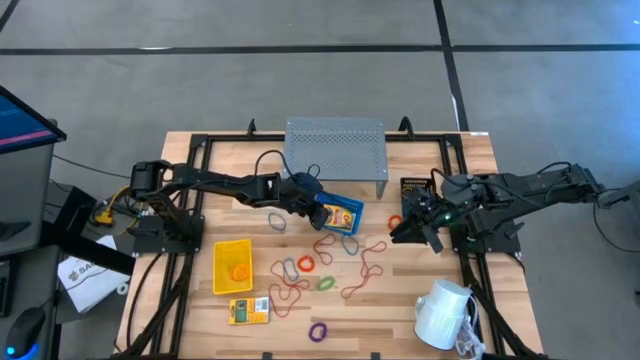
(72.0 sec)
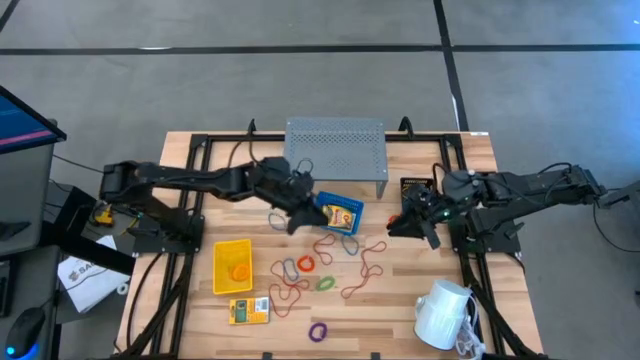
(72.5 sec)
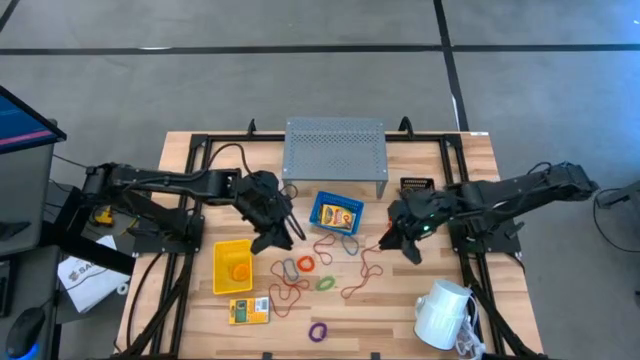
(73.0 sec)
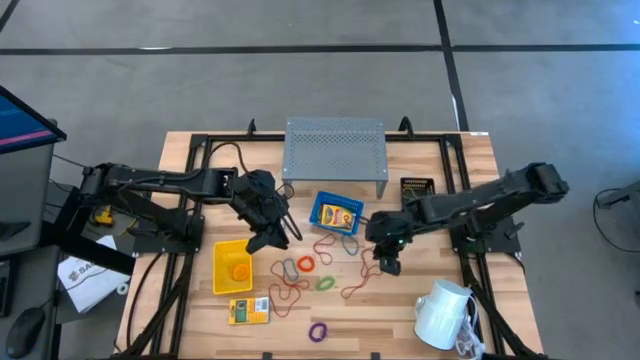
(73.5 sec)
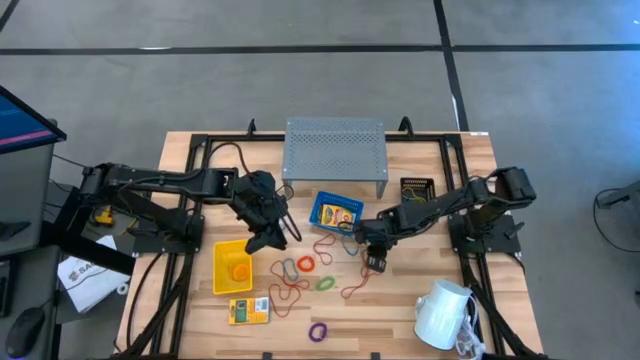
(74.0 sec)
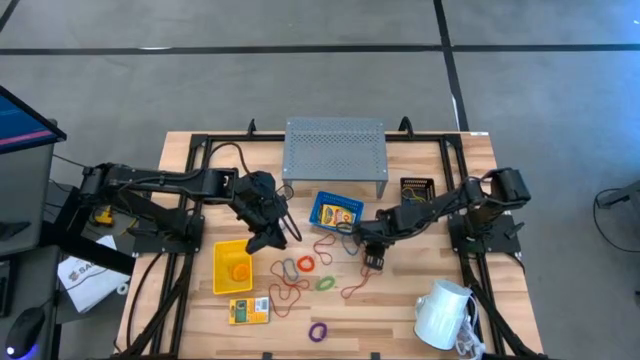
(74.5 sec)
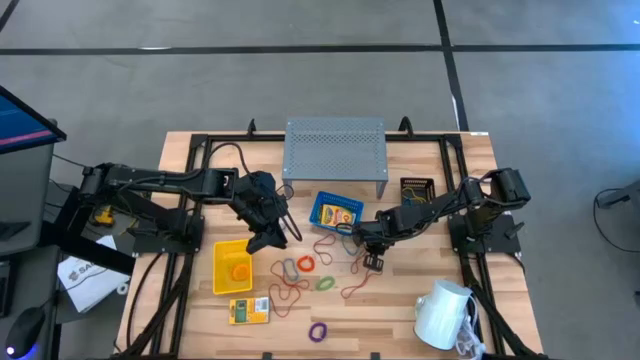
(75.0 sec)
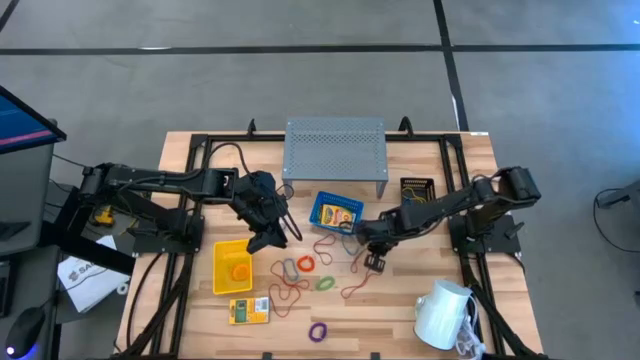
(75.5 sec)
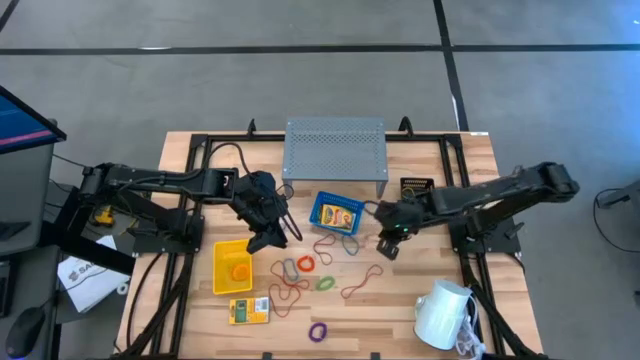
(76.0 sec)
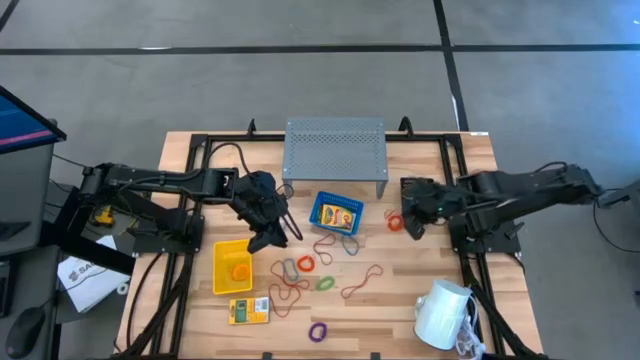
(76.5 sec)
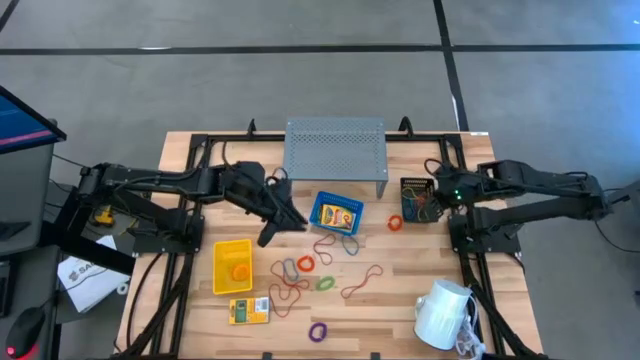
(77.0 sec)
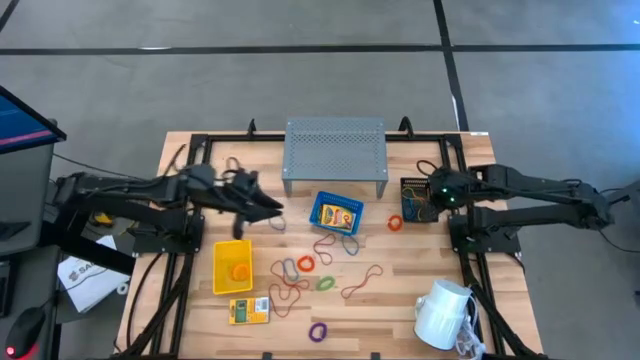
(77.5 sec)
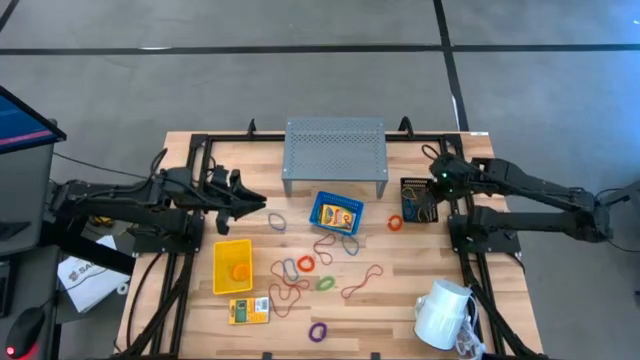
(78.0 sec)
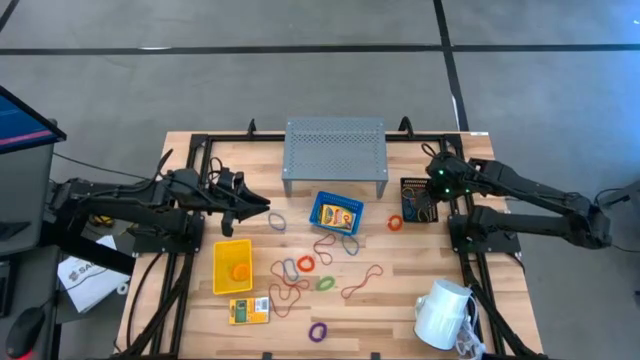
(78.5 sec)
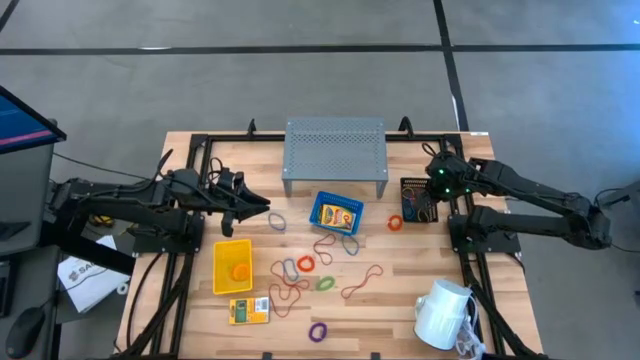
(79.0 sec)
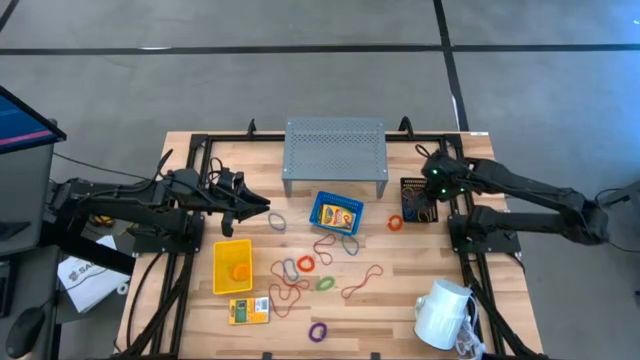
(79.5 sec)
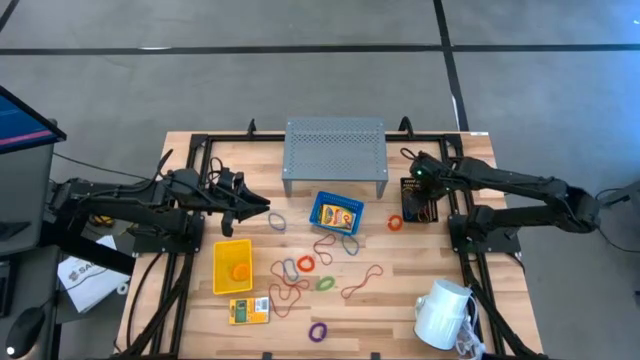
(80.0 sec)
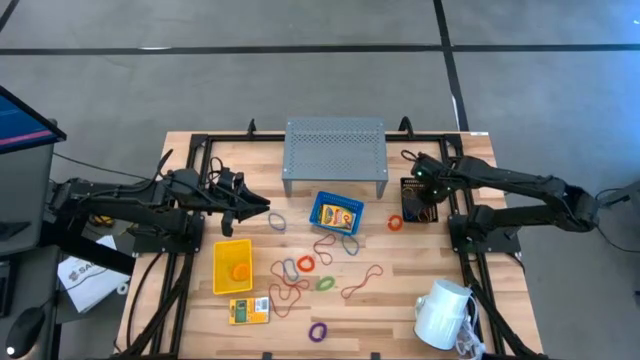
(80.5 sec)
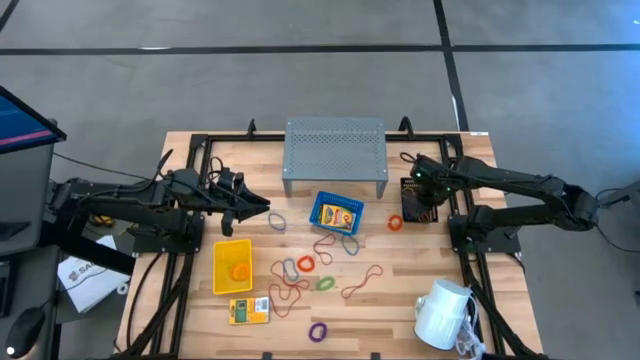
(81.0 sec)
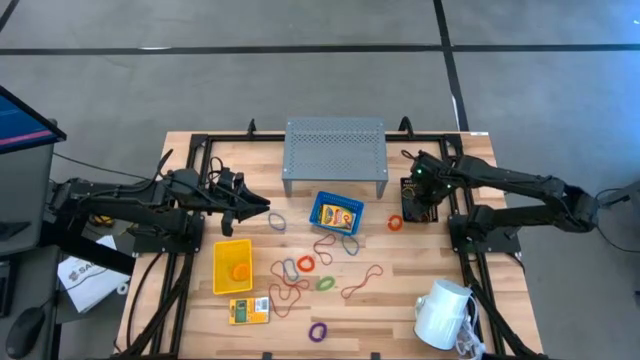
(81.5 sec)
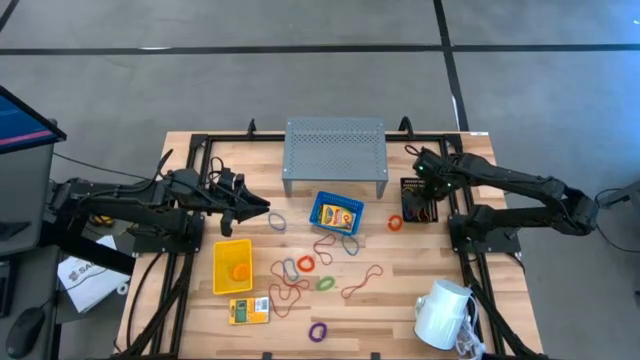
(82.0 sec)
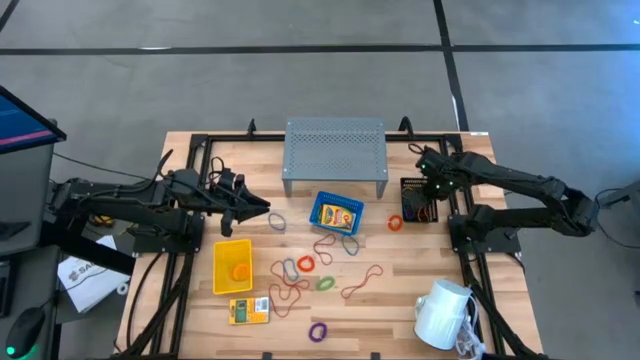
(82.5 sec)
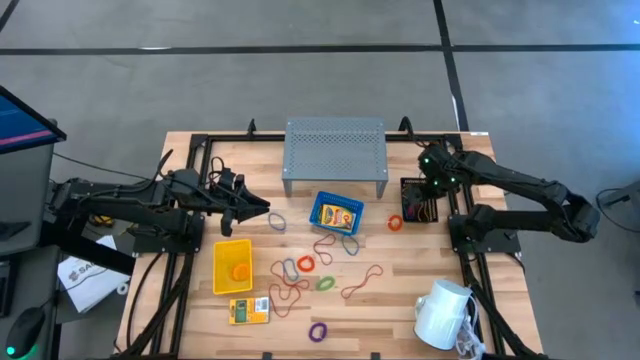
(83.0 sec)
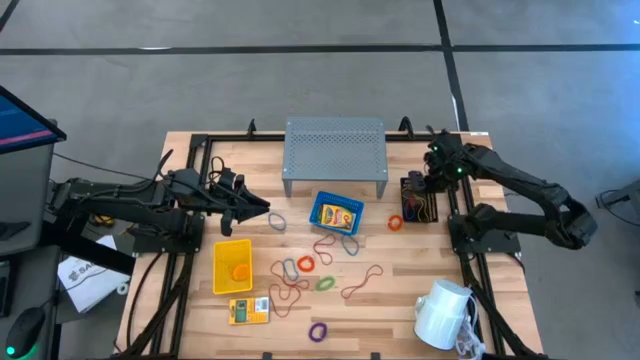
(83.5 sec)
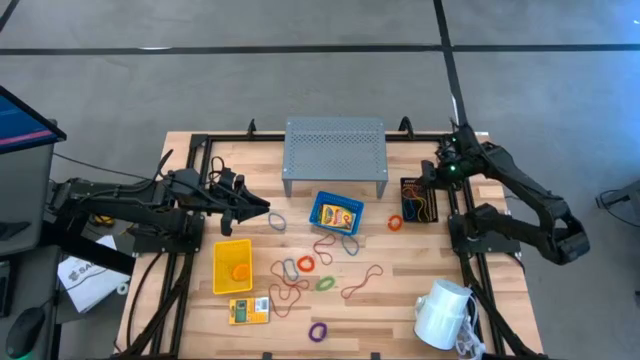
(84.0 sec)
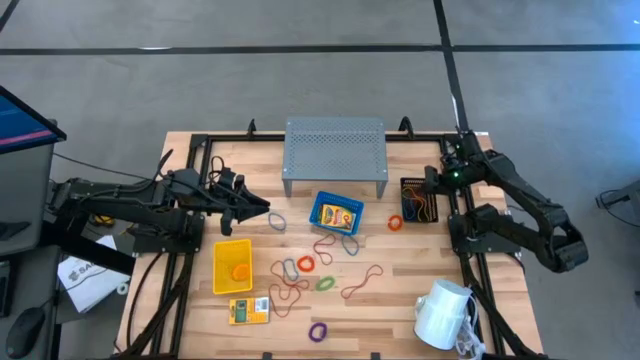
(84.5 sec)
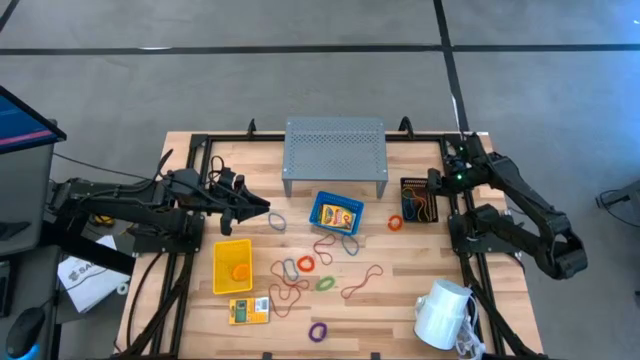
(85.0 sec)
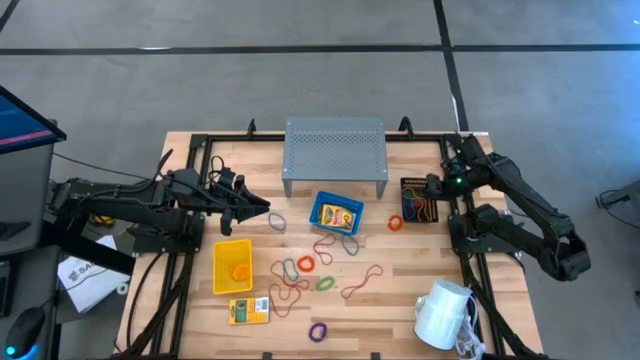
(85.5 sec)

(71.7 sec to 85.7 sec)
Task: Pick & Place Office Desk Supplies
Put the red rubber band into the black bin

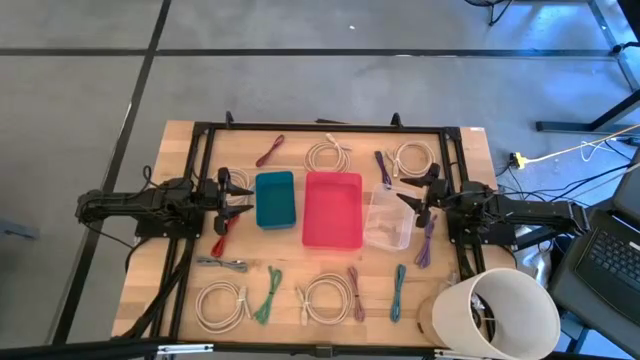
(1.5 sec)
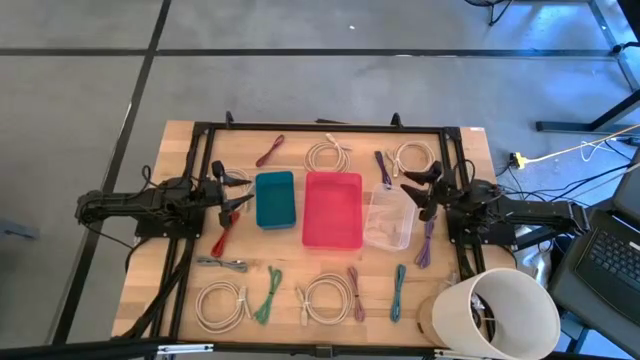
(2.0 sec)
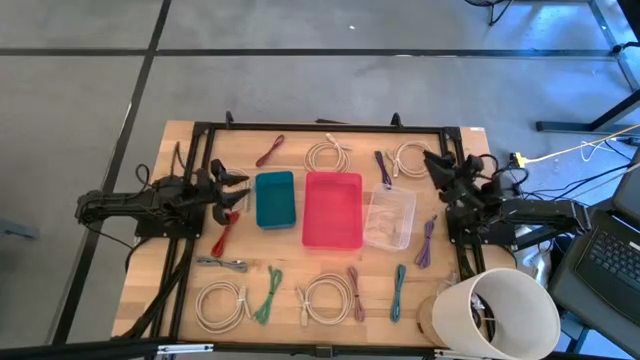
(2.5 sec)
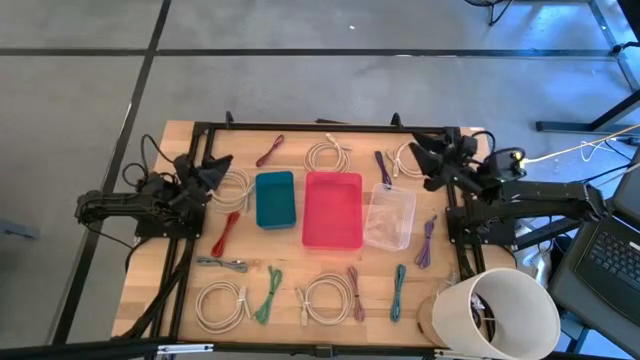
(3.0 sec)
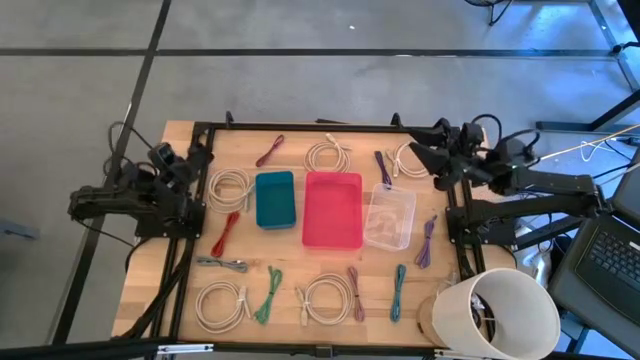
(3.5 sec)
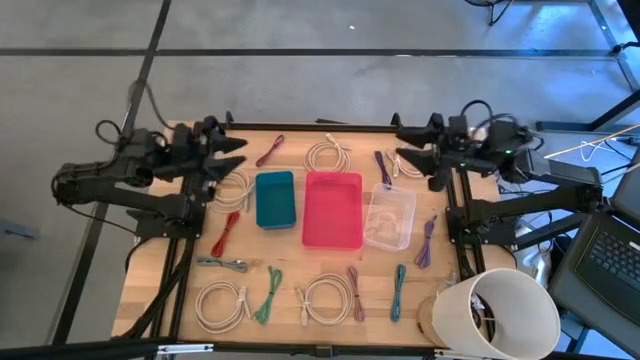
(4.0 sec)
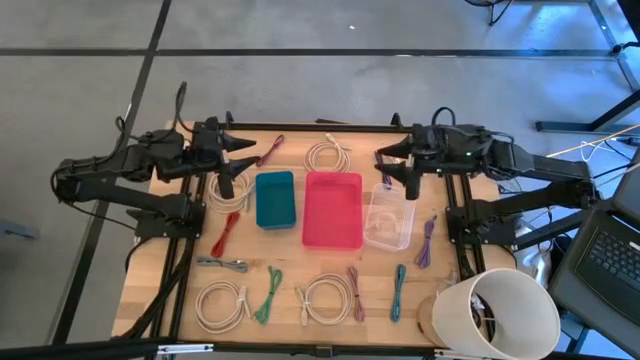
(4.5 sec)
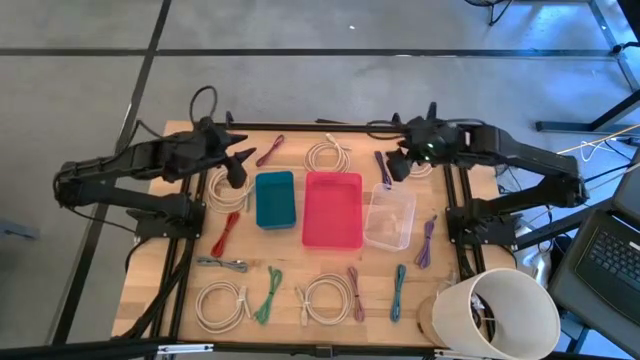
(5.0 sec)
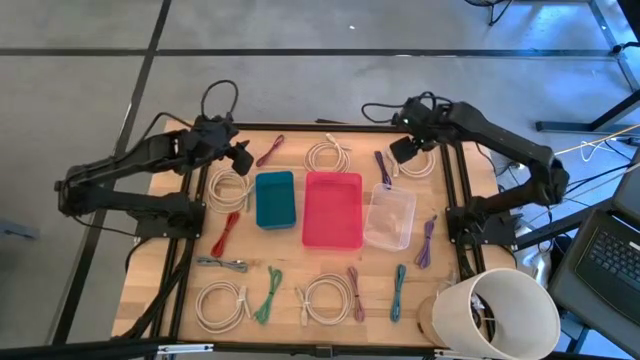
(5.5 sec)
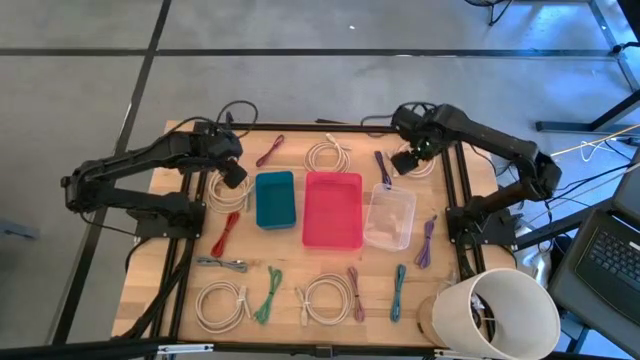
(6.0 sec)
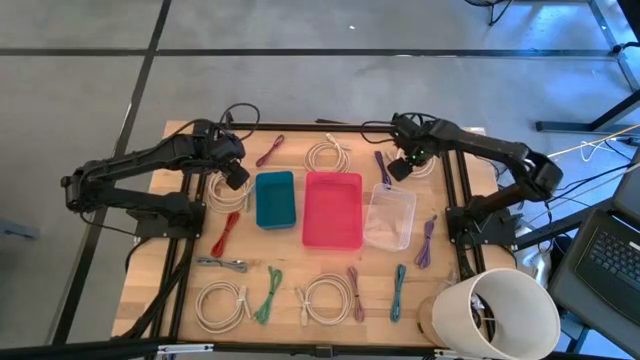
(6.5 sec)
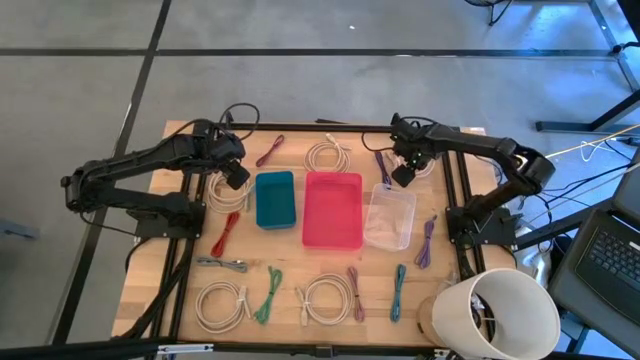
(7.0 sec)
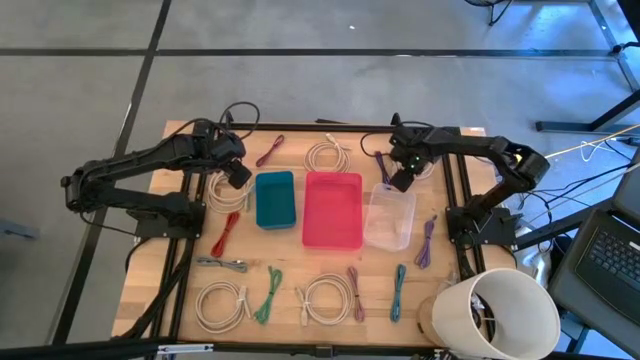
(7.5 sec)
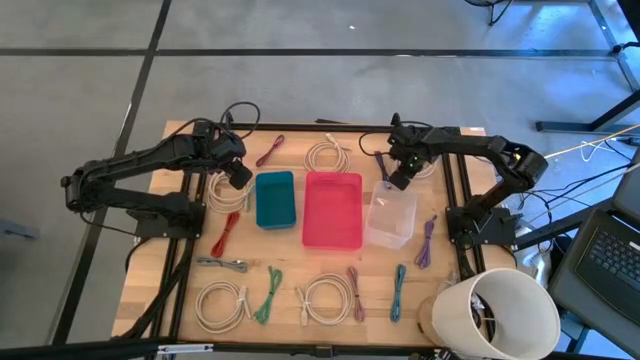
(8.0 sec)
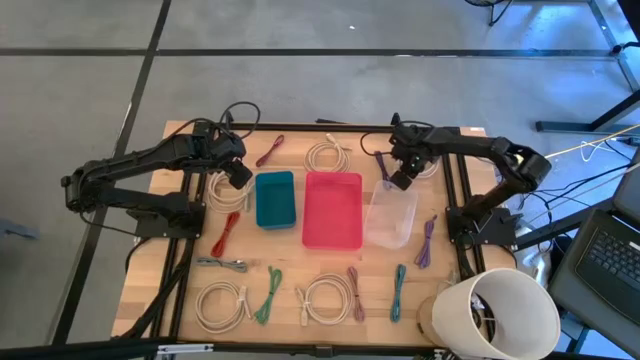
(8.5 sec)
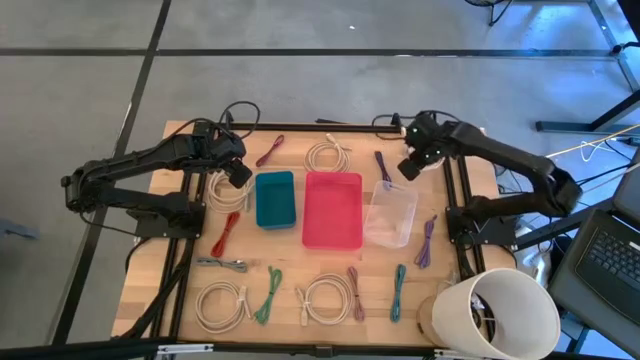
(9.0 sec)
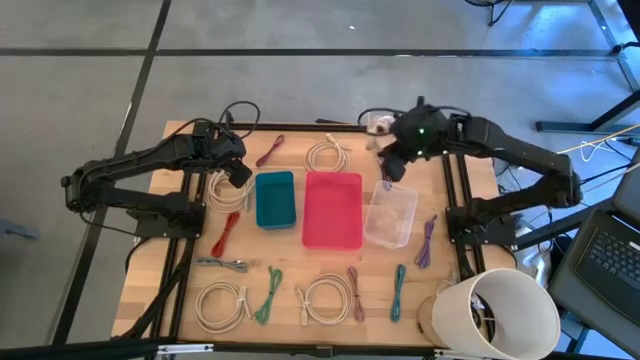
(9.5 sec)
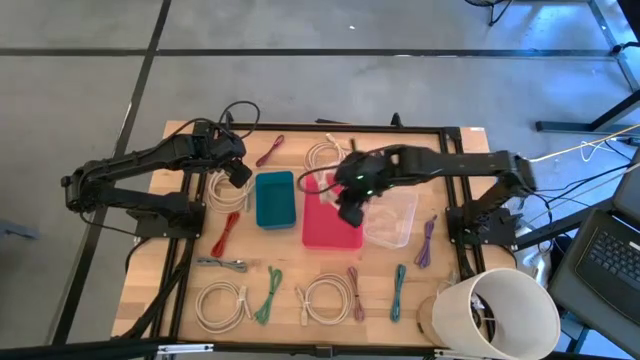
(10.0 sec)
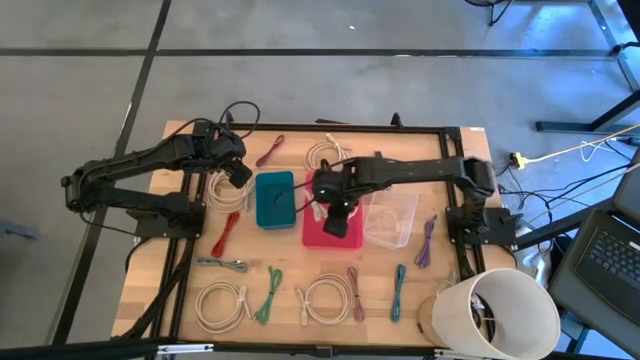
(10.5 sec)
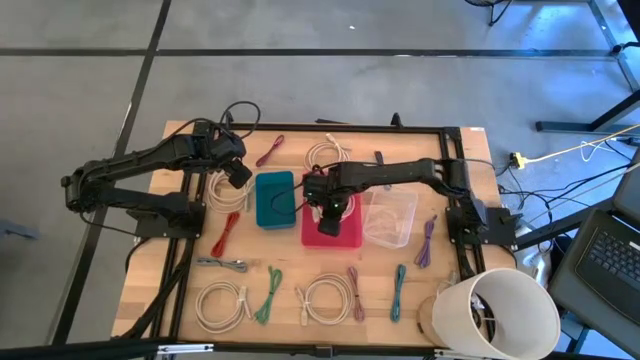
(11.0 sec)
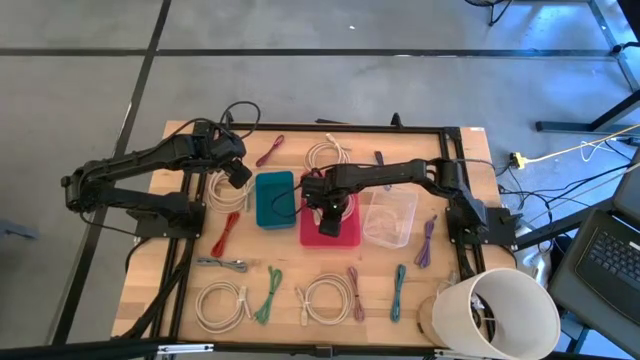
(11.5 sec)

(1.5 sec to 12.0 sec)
Task: Pick & Place USB Port
Put the white charger cable into the pink bin
